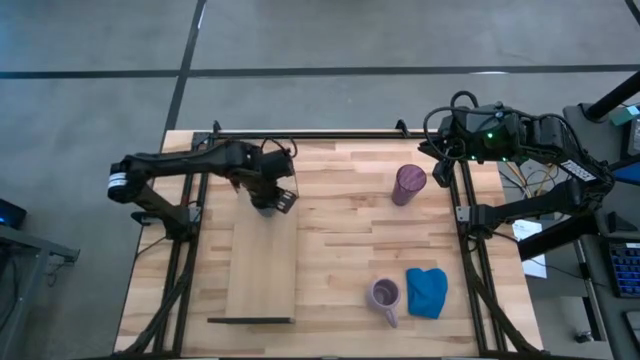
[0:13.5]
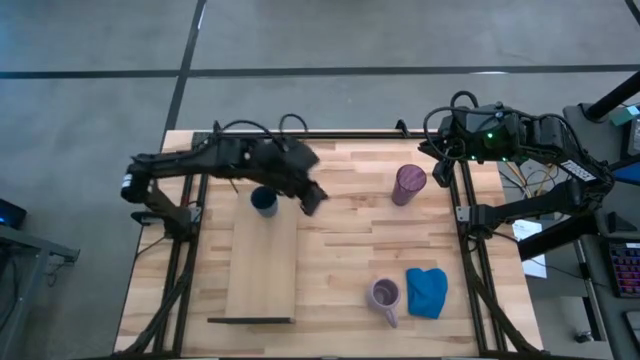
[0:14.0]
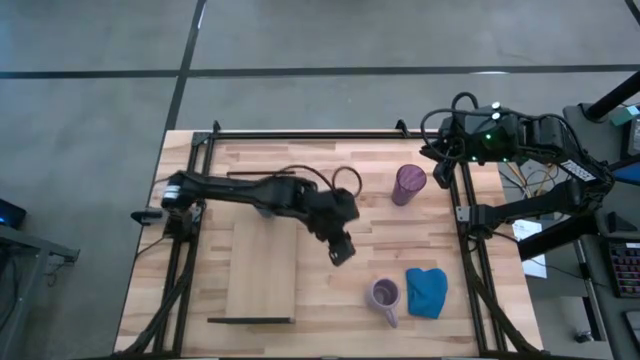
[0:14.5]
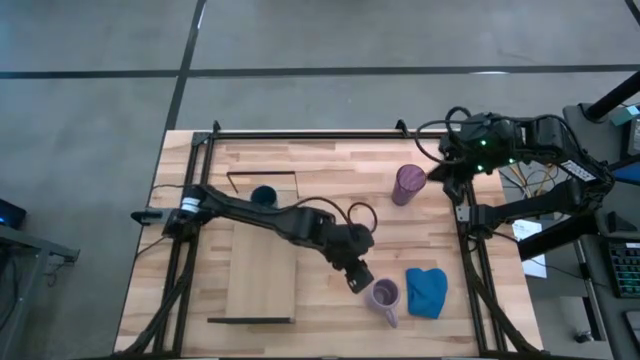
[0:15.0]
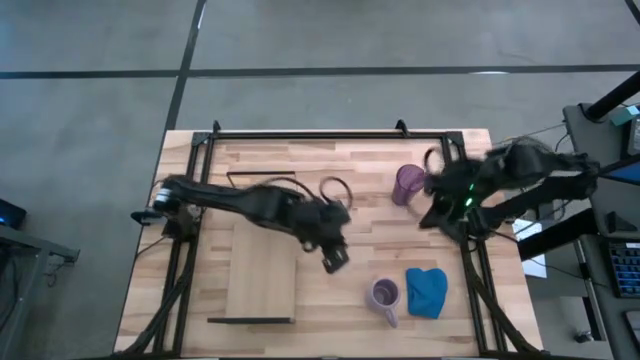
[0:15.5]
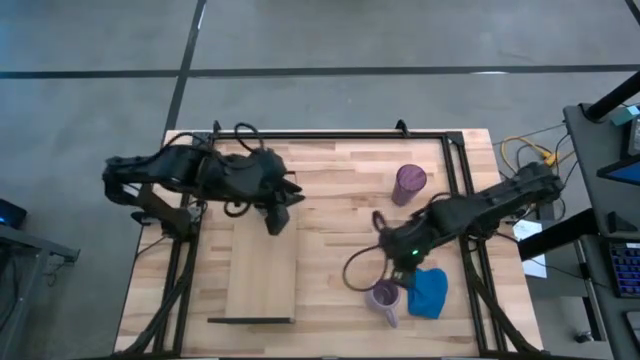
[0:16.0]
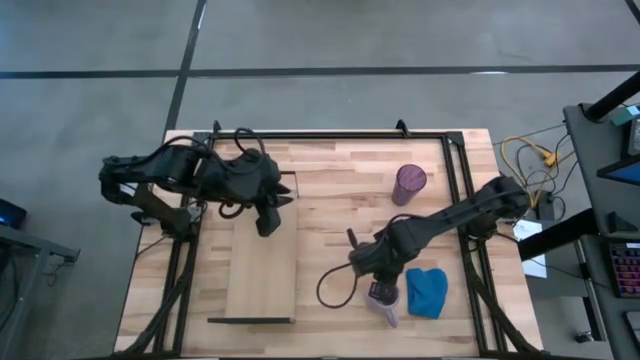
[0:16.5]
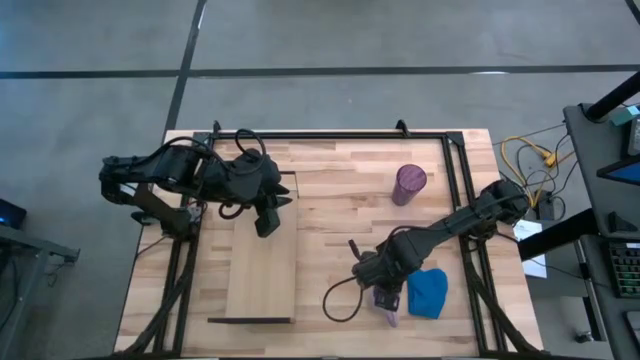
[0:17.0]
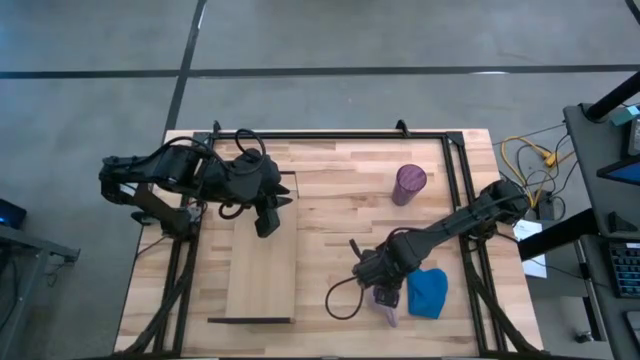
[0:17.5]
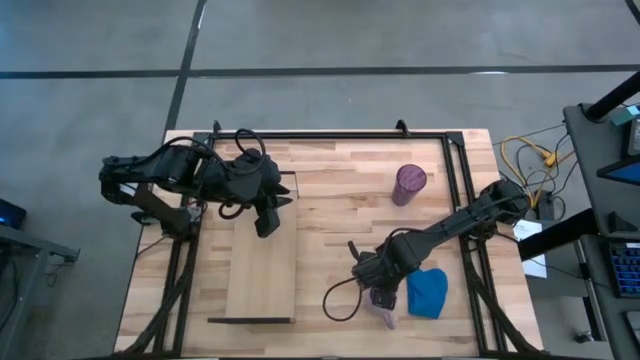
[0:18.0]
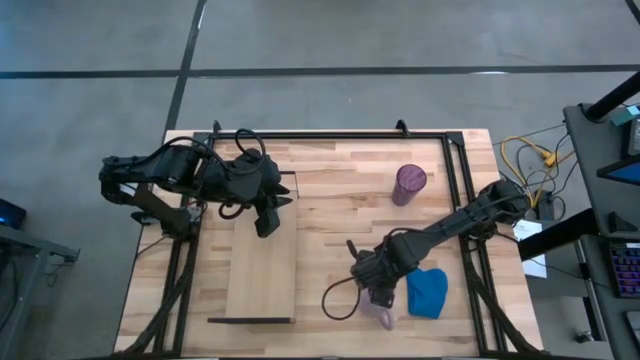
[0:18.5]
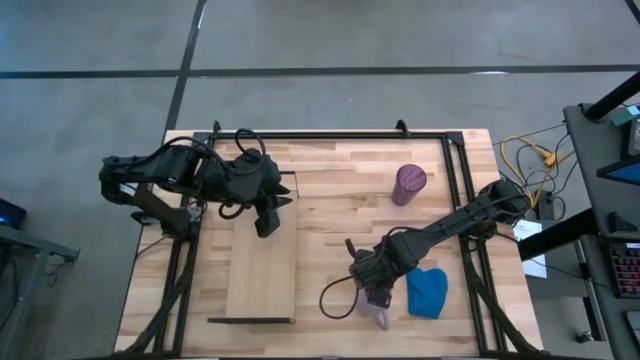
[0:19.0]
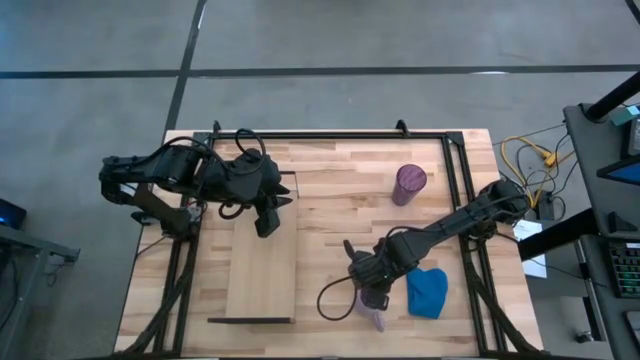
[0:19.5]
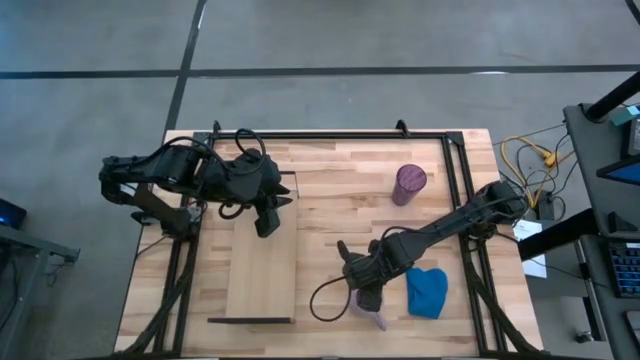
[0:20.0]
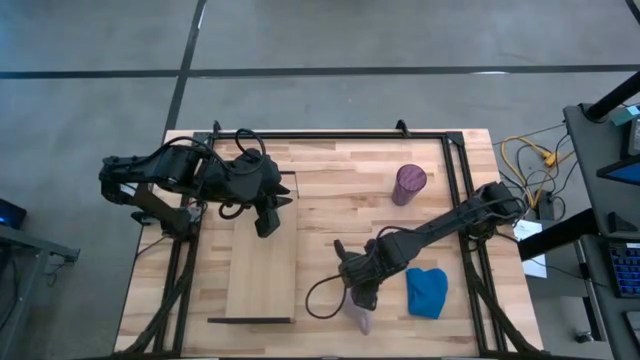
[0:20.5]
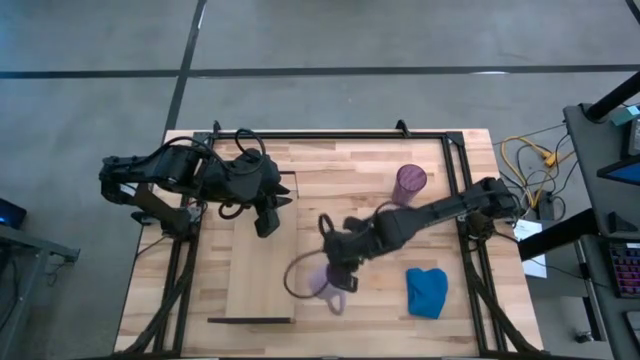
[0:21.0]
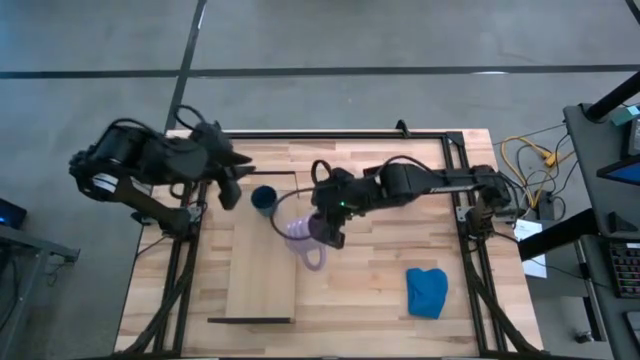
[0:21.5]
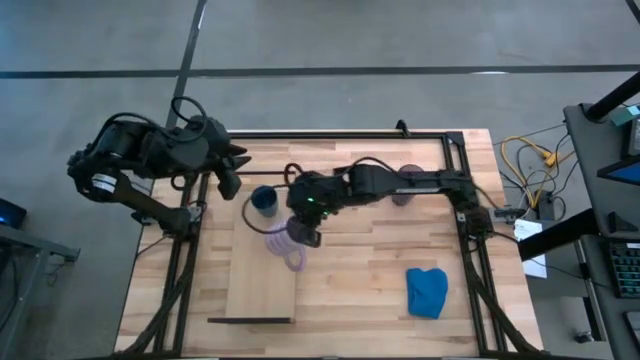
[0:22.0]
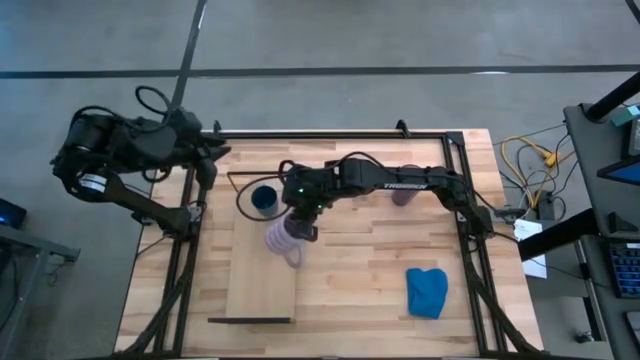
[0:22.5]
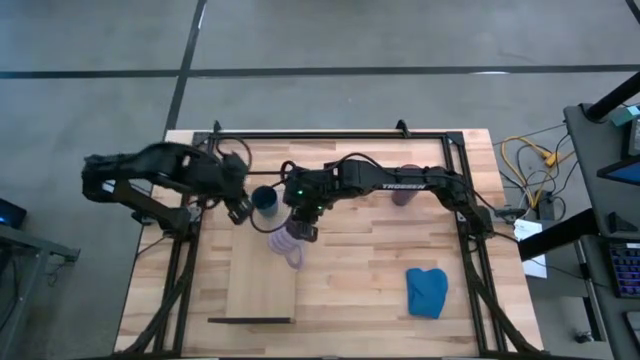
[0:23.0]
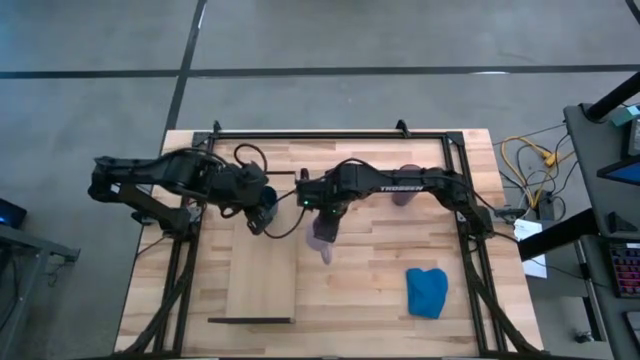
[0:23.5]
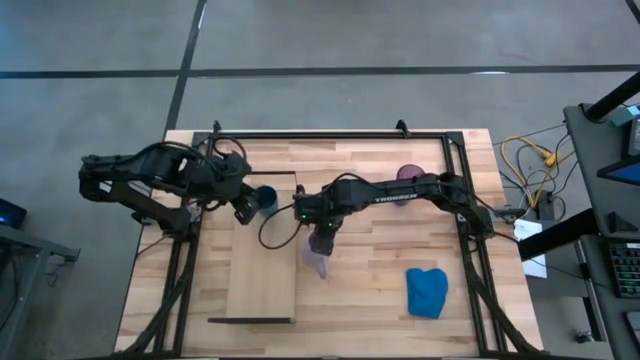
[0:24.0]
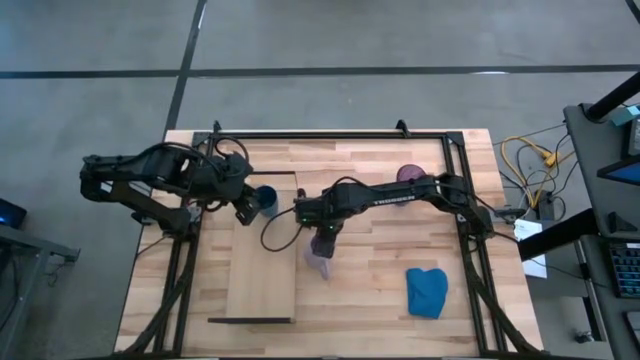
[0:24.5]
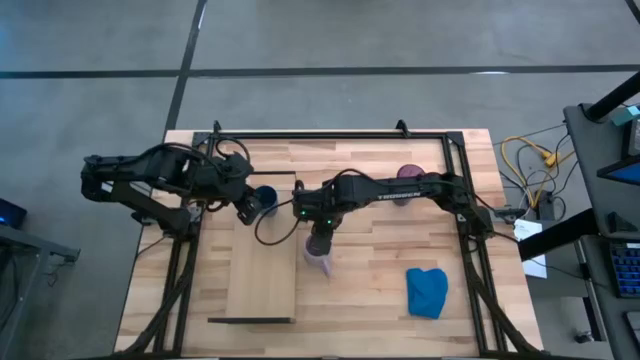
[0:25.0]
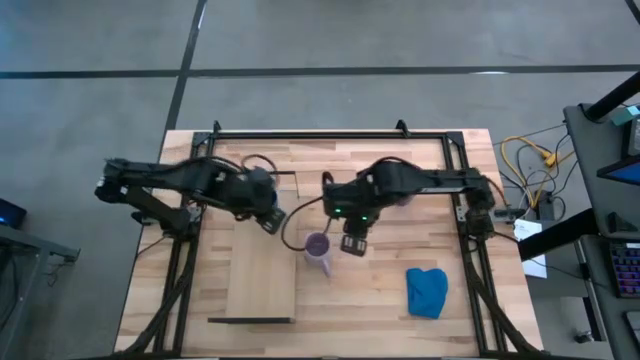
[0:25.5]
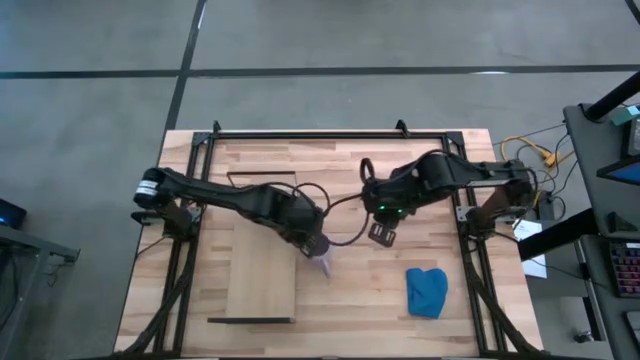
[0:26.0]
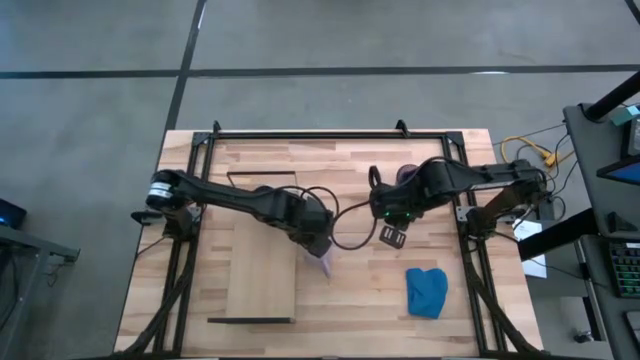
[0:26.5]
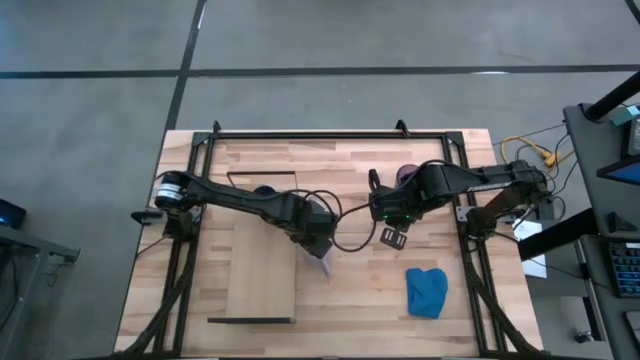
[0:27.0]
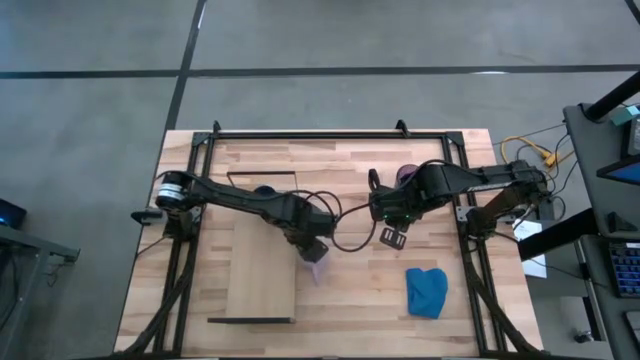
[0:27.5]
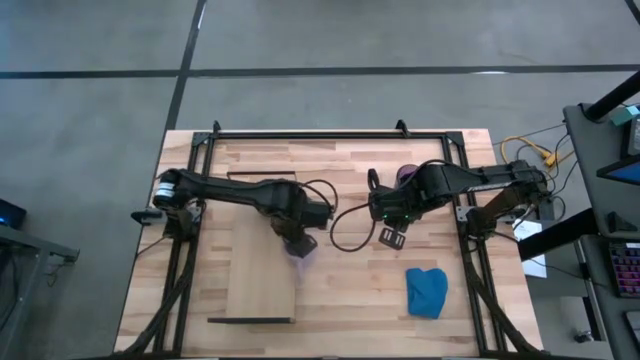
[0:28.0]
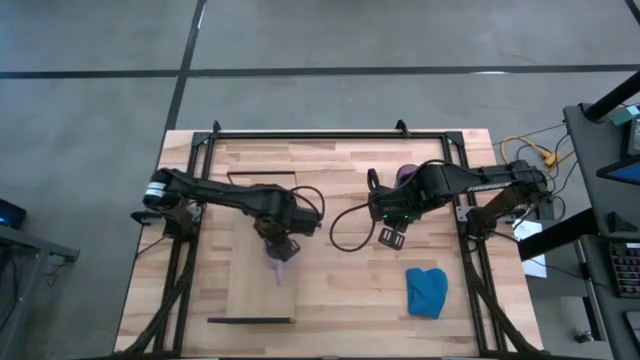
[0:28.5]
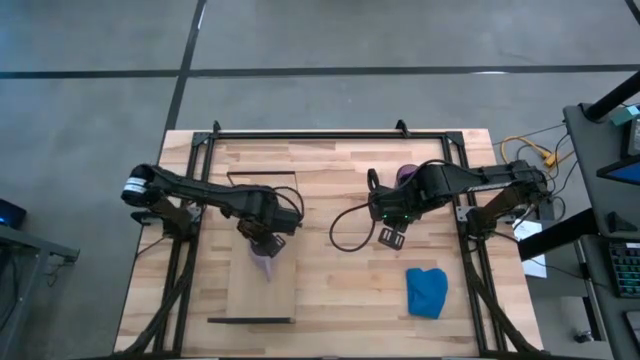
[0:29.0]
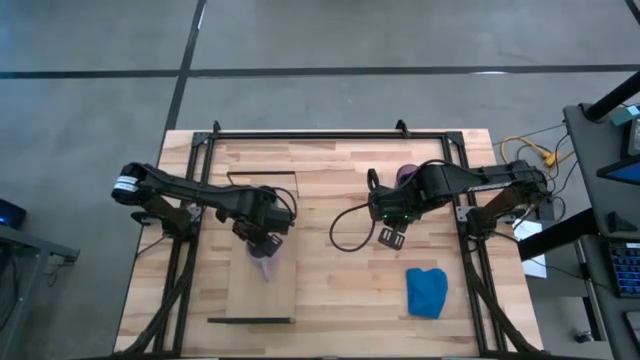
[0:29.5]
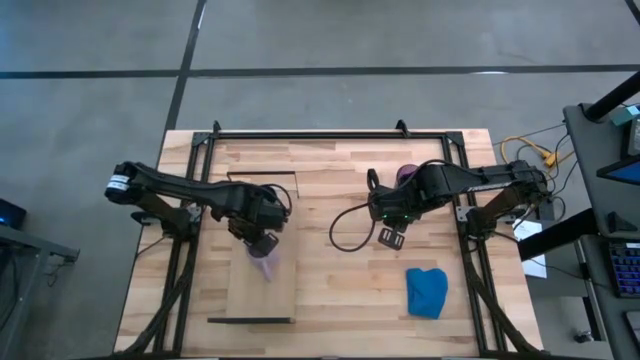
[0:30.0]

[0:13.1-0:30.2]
Task: Stack small to large cups/mugs on shelf
Put the purple mug on the shelf

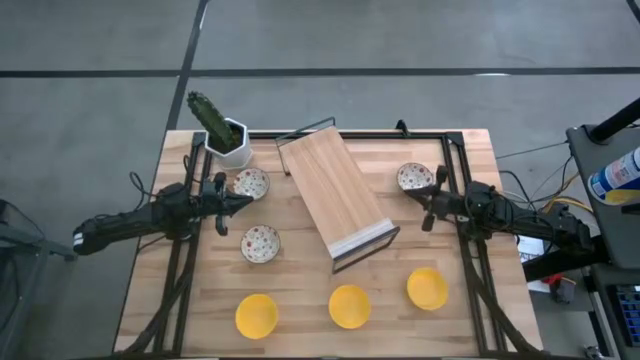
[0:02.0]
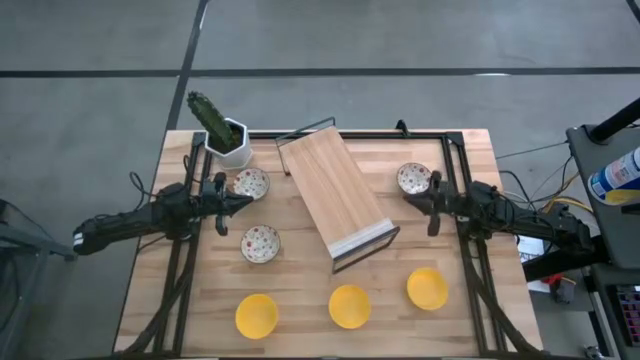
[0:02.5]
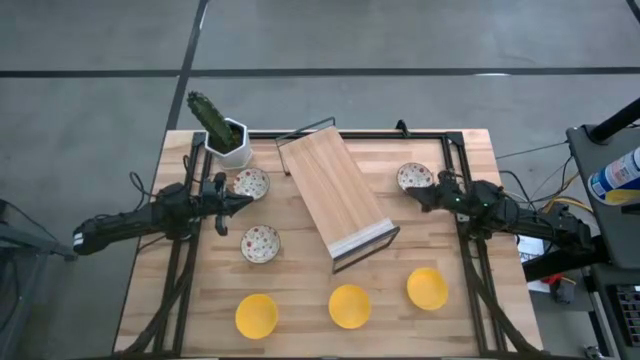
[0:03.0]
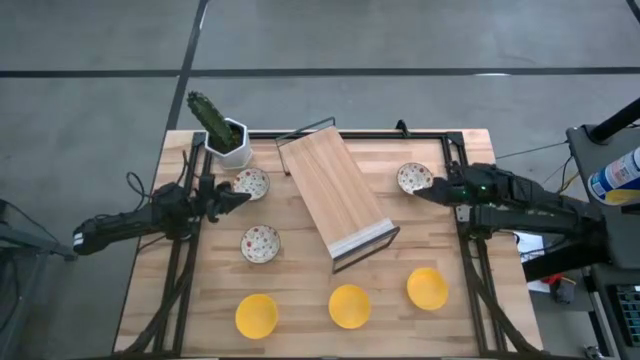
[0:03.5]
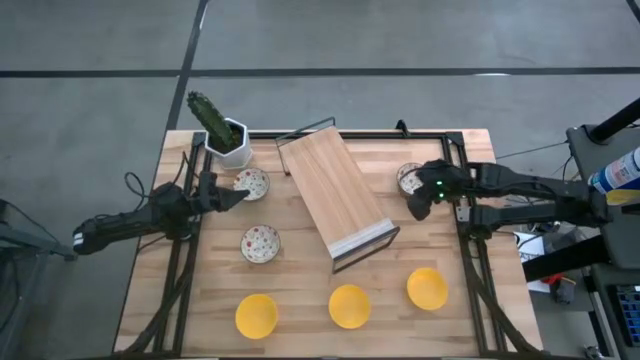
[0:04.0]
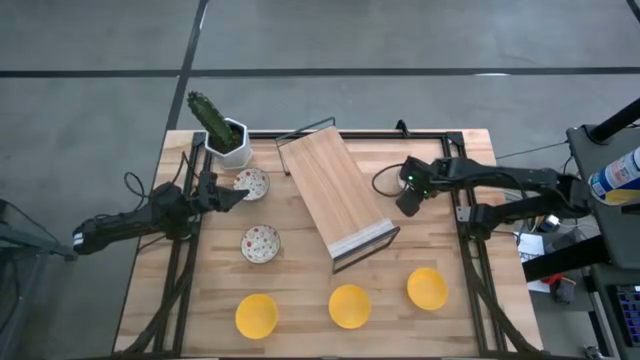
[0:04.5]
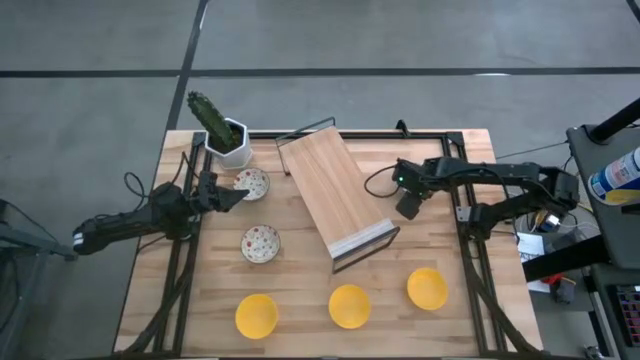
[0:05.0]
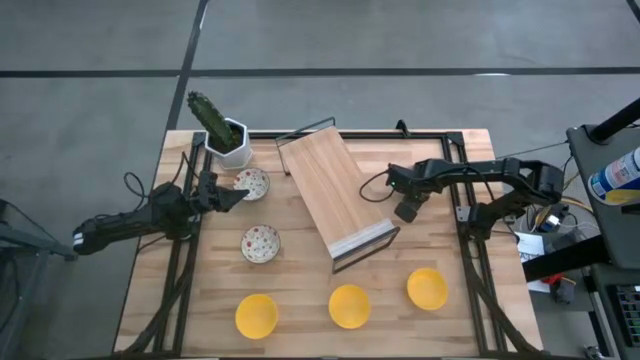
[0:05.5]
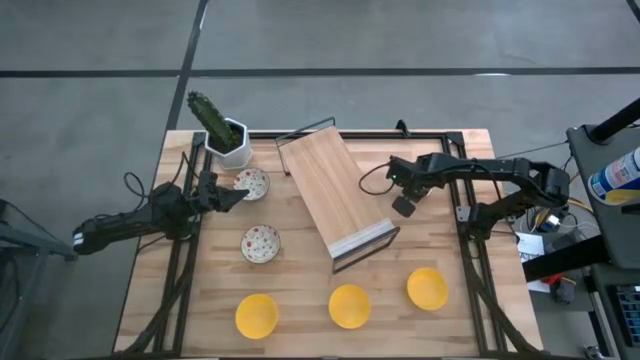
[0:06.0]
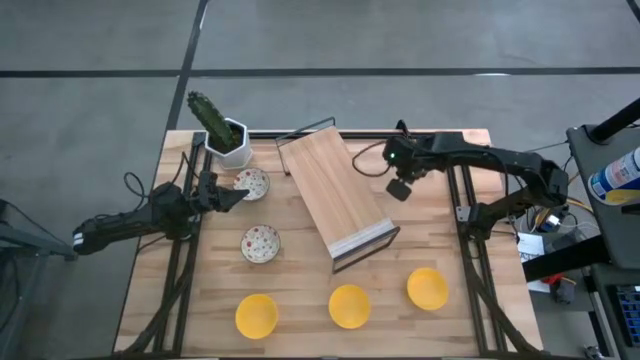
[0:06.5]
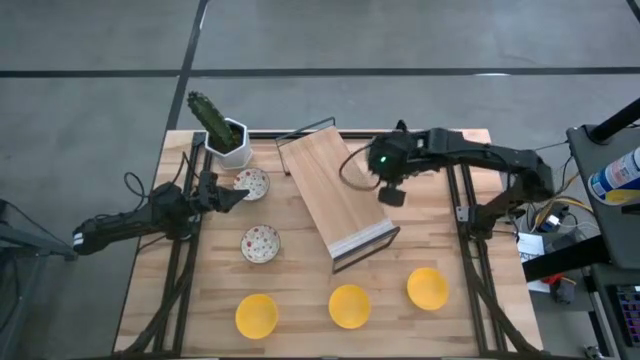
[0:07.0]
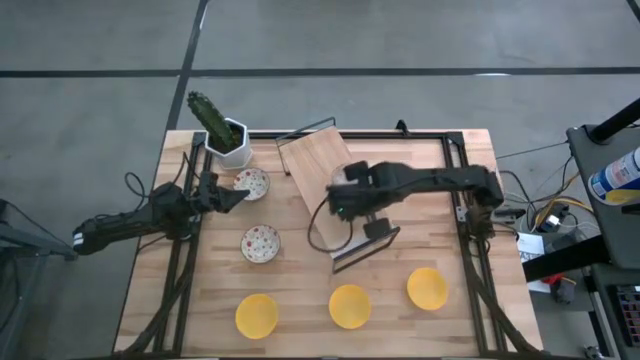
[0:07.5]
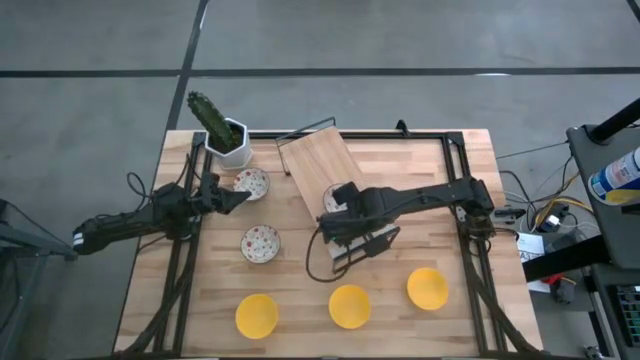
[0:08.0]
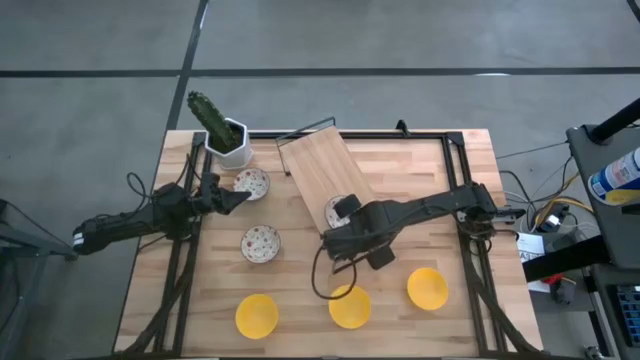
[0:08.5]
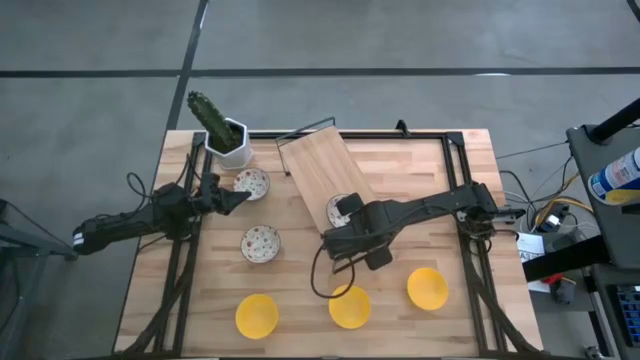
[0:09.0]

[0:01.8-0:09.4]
Task: Pick & Place Mini bowls
Put the top right white patterned bowl on the shelf
